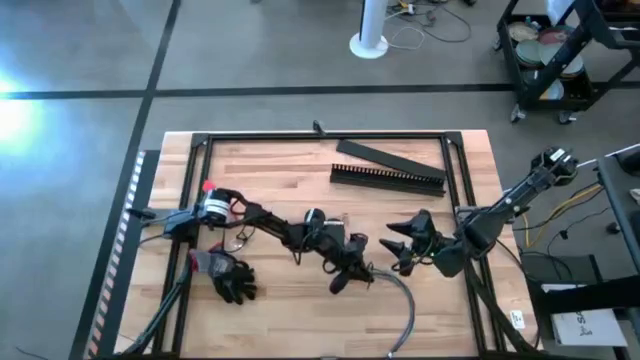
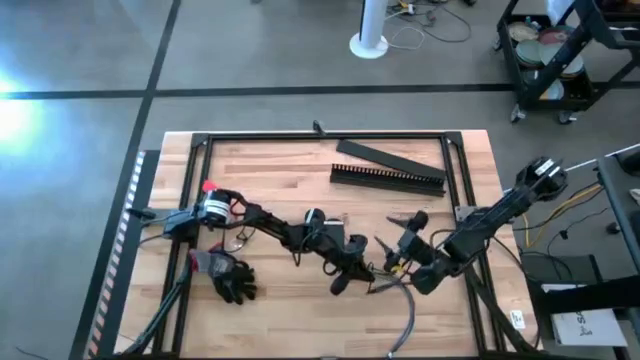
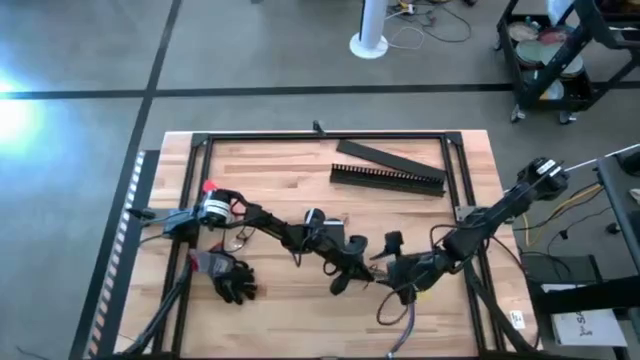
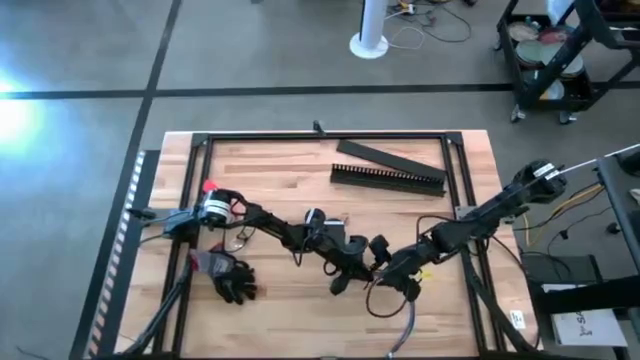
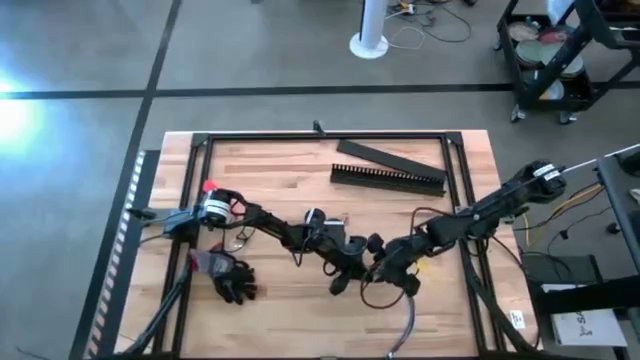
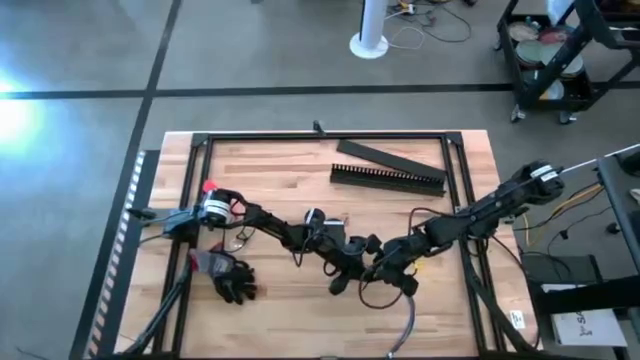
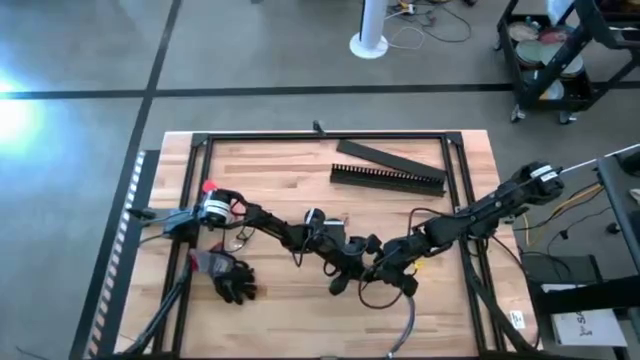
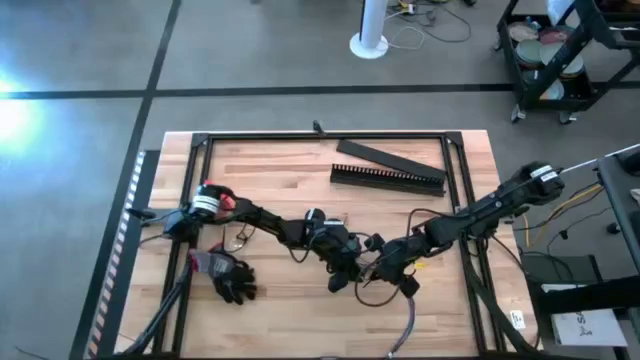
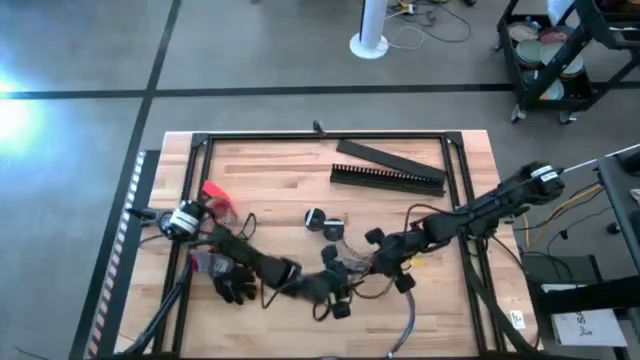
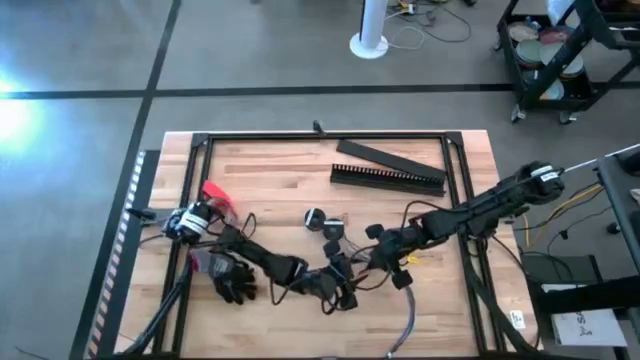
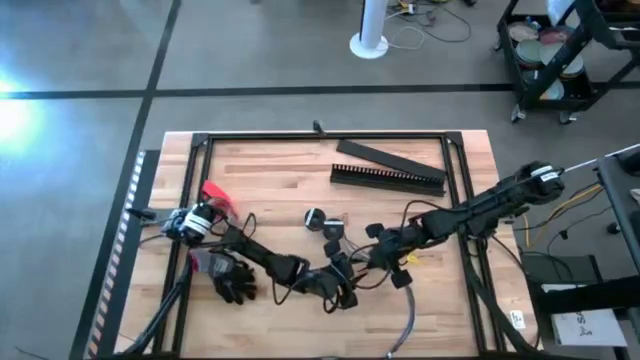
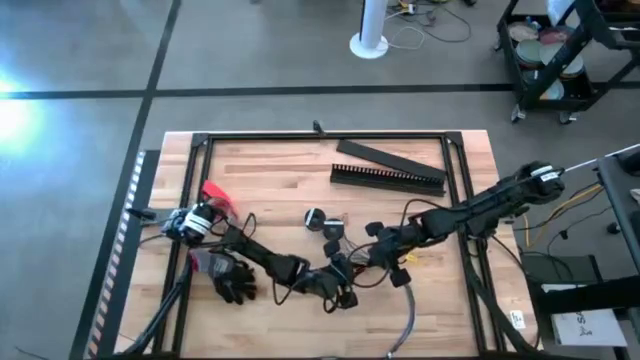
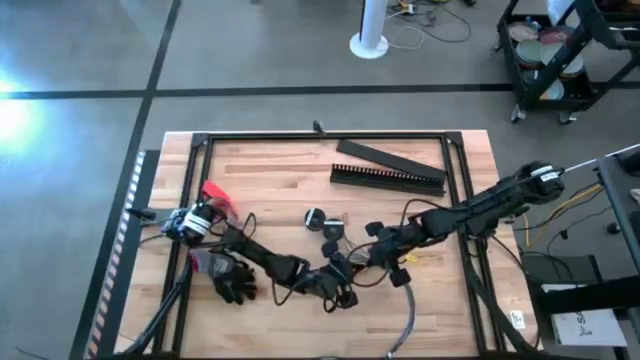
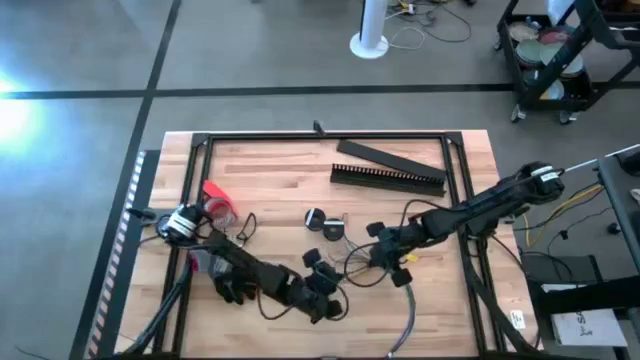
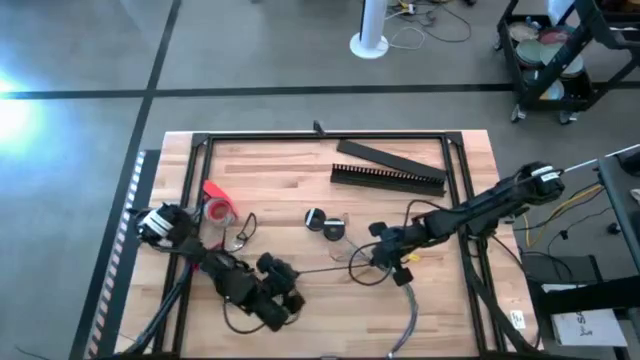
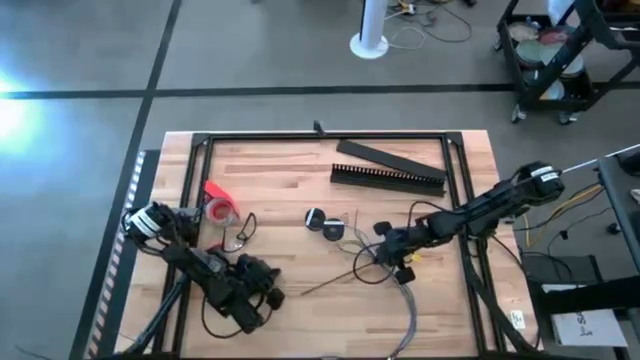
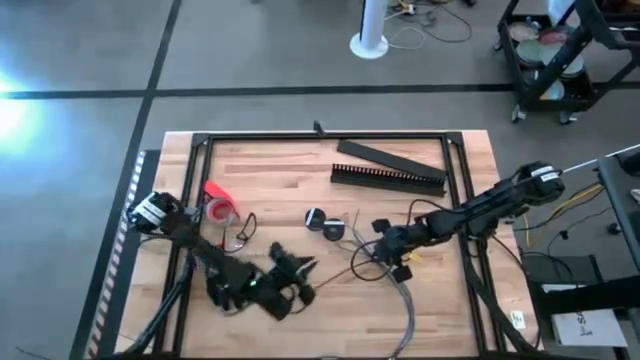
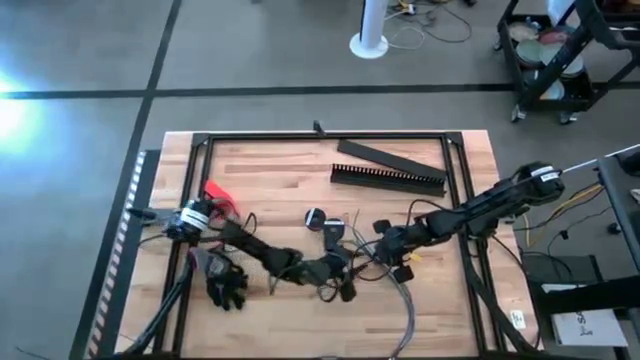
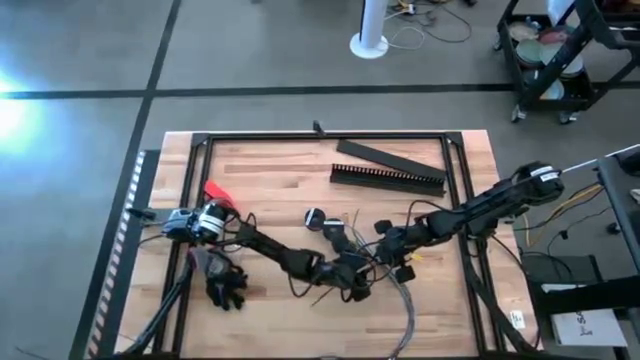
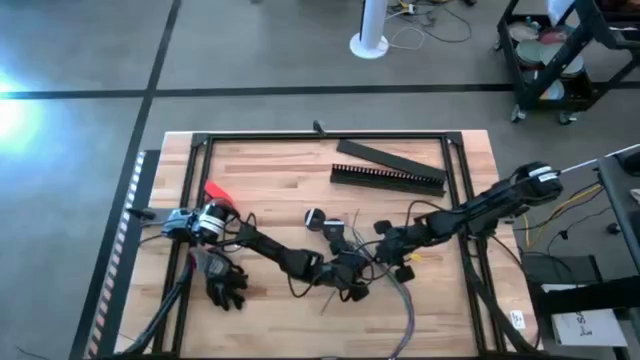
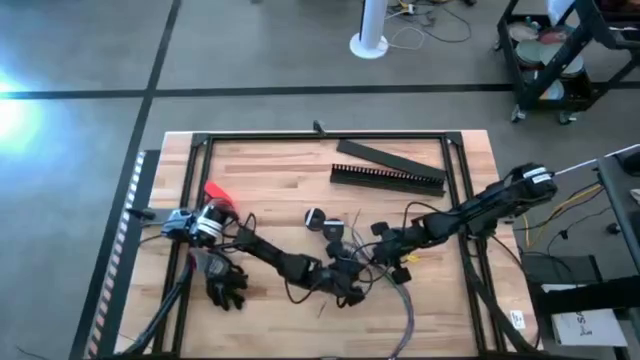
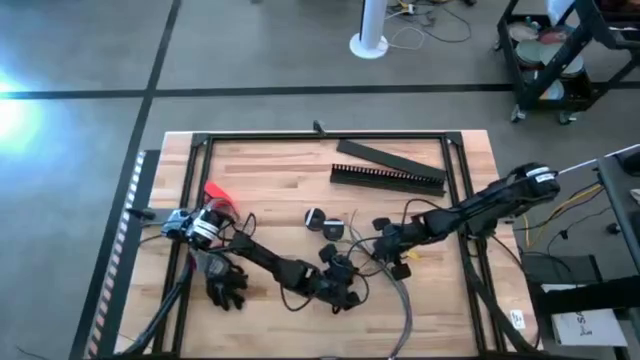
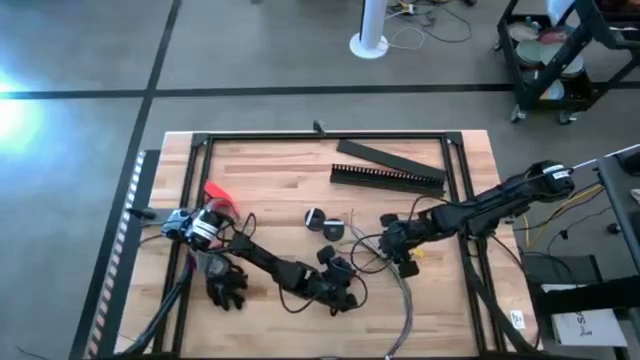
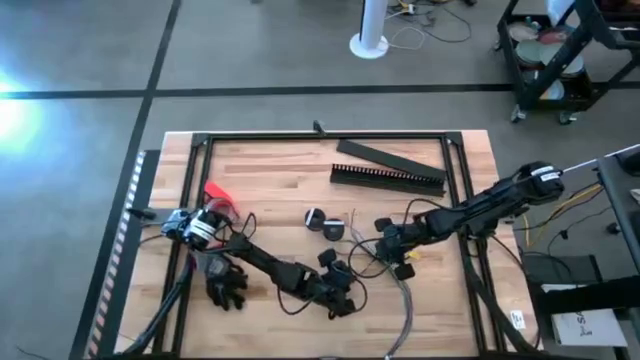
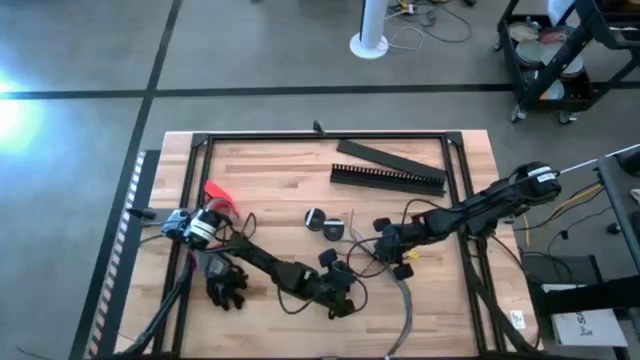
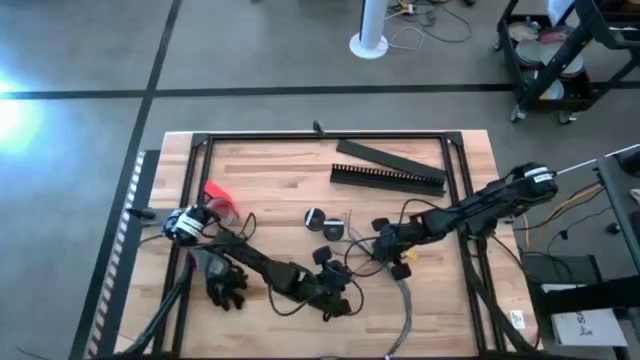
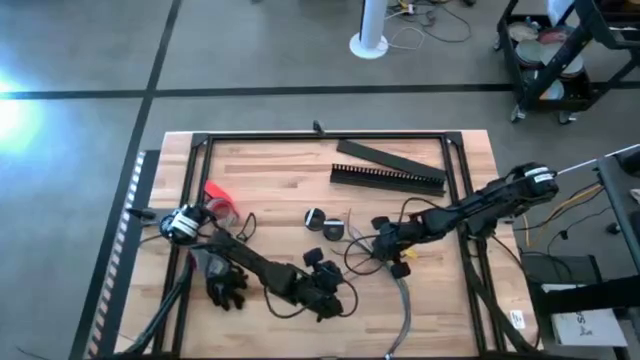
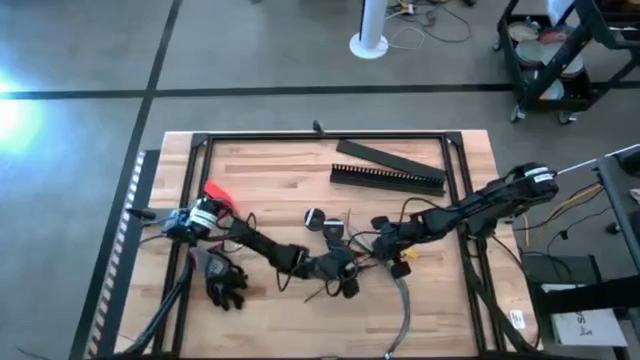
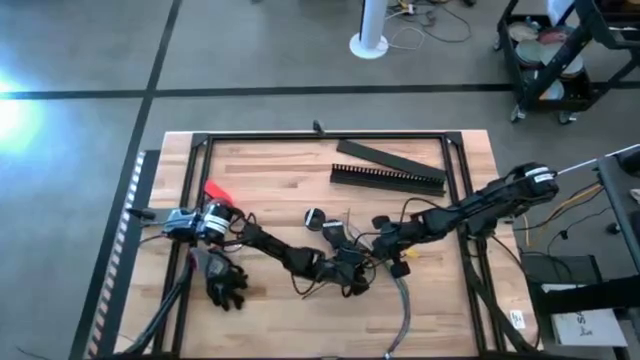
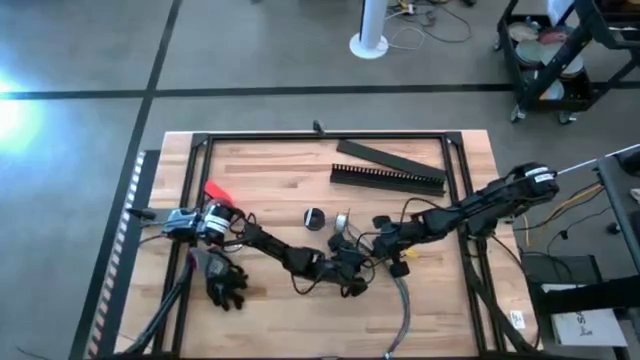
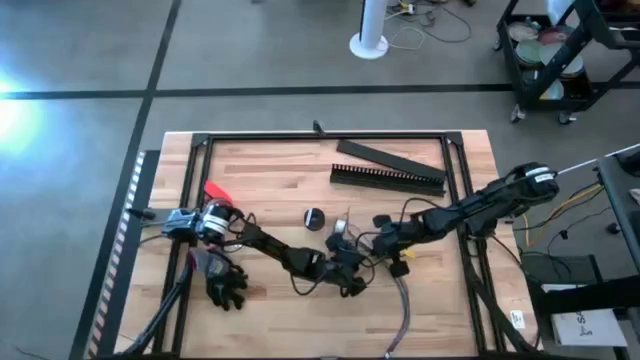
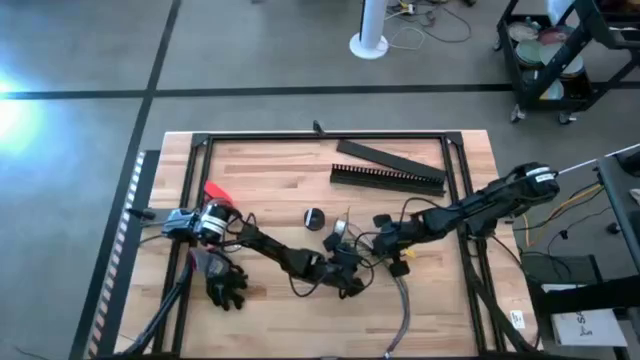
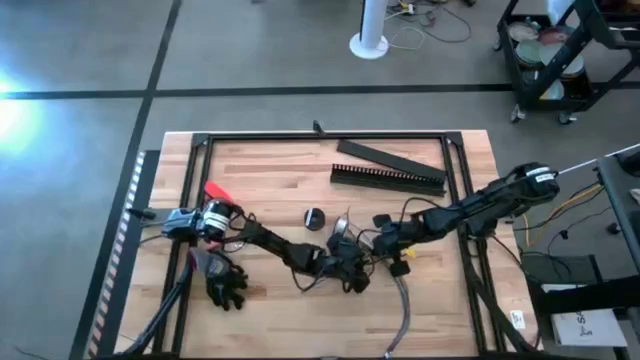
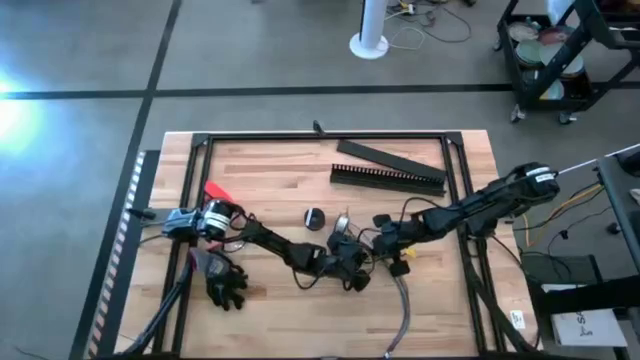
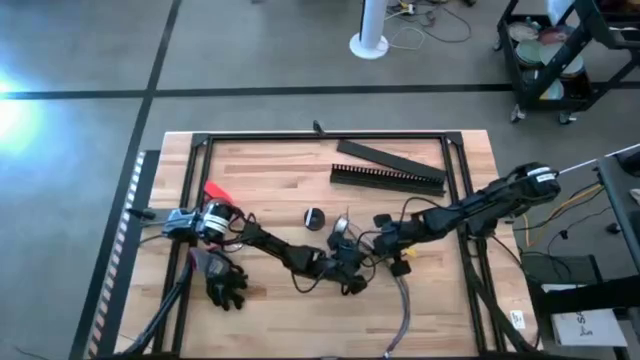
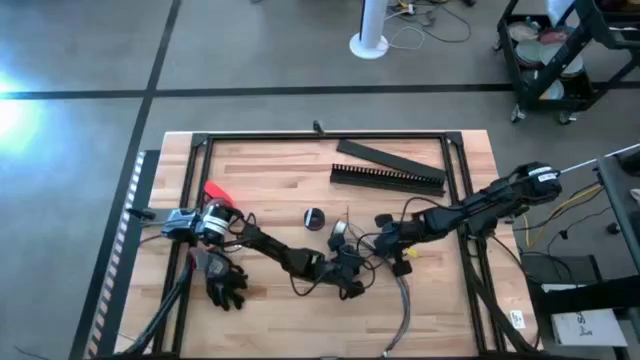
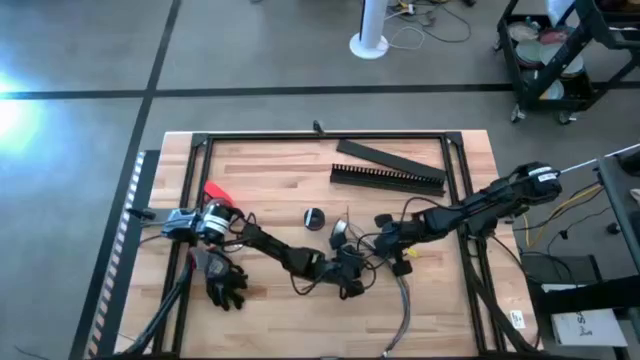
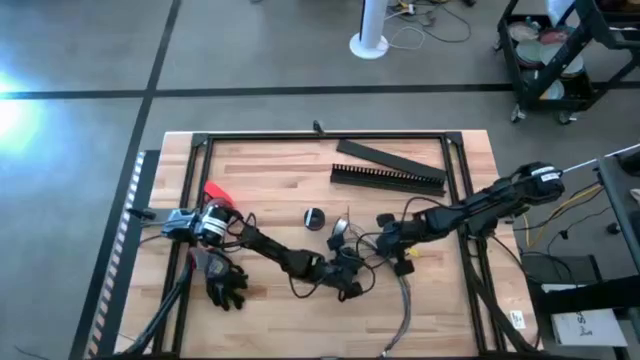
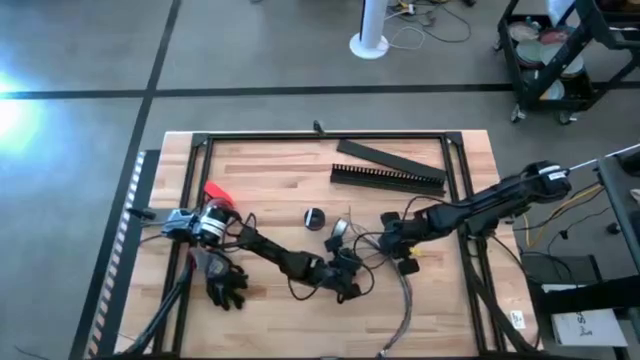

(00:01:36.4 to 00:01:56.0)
Task: Ziptie cables
Wrap the black zip tie on the cables

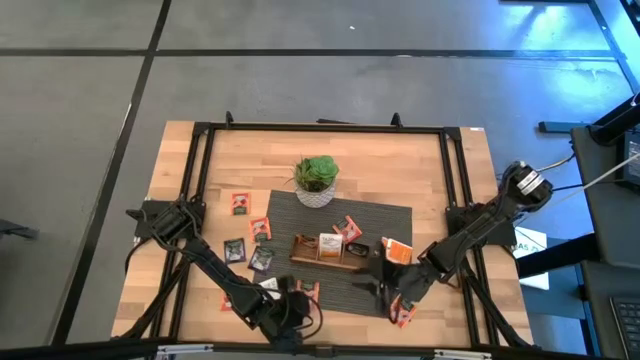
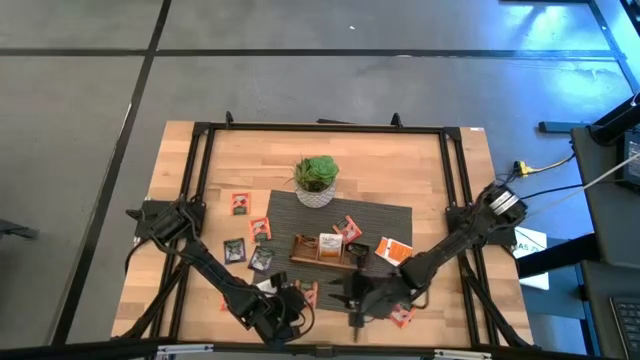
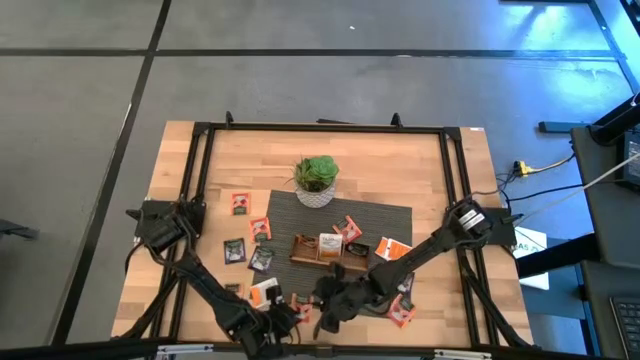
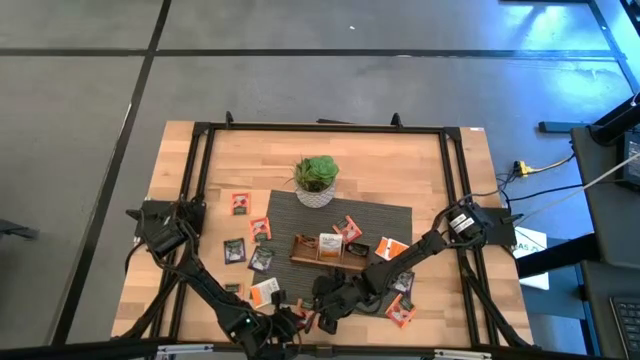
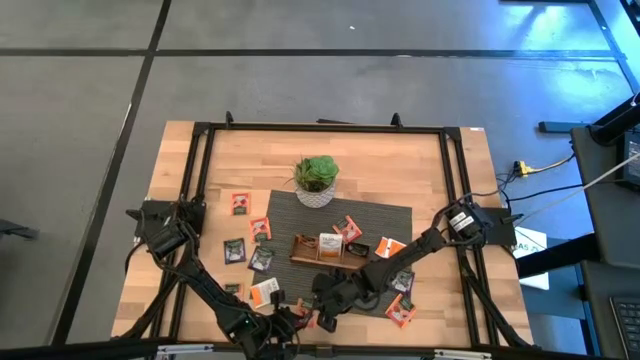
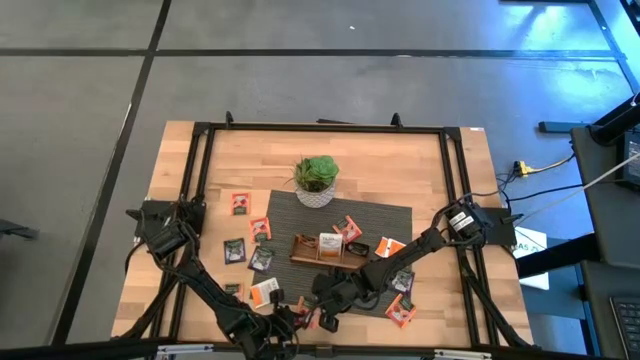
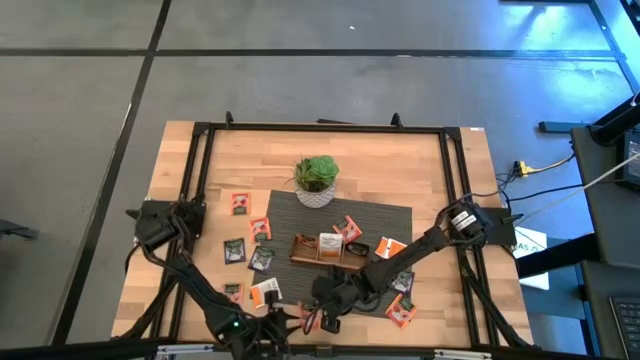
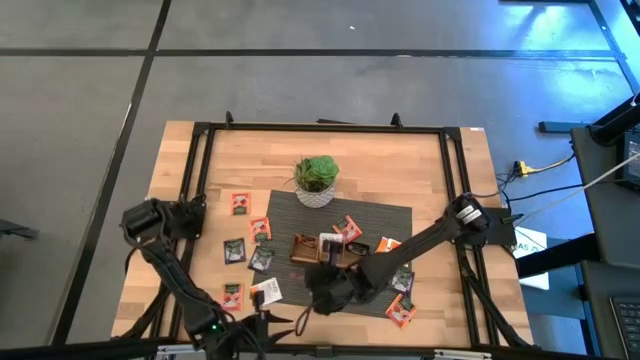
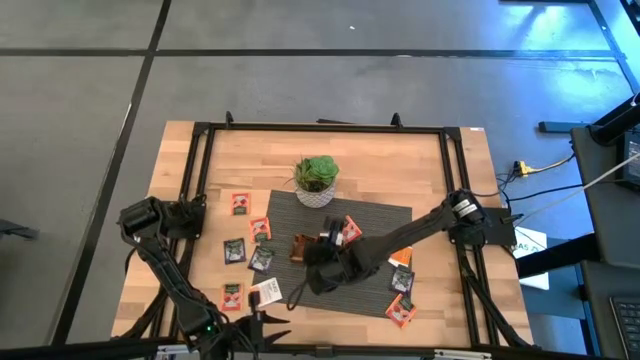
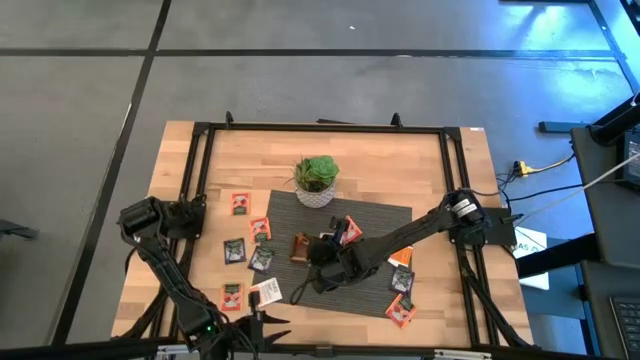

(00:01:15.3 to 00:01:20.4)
Task: Pick & Place Tea
Put the orange tea bag into the left section of the wooden organizer
